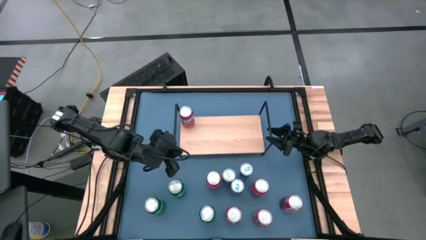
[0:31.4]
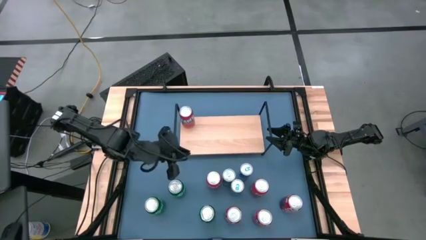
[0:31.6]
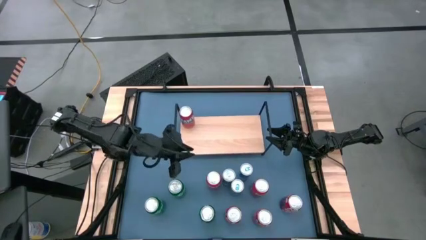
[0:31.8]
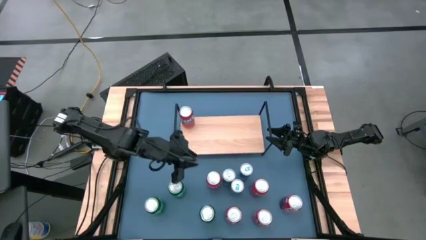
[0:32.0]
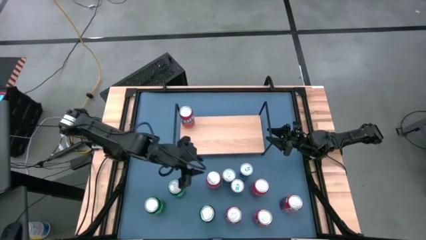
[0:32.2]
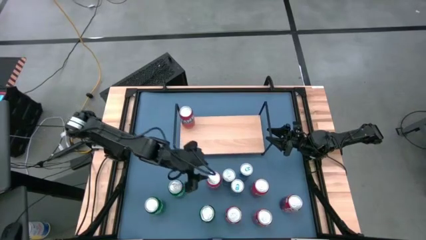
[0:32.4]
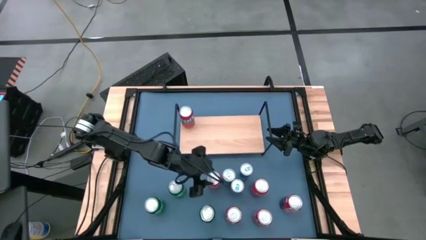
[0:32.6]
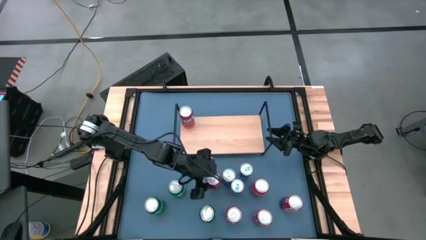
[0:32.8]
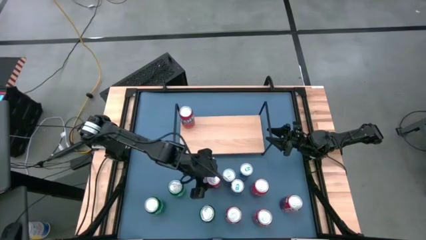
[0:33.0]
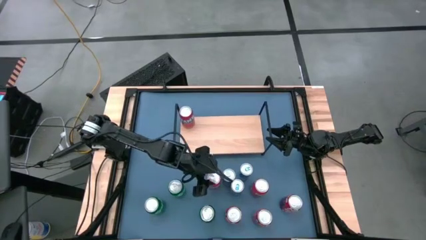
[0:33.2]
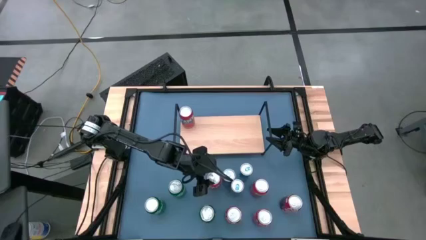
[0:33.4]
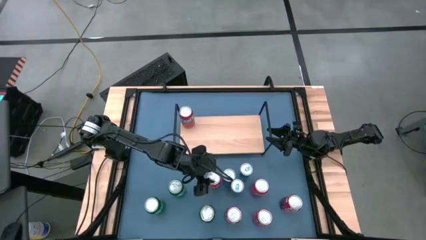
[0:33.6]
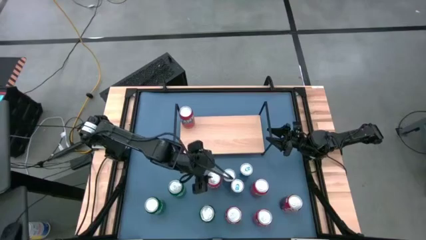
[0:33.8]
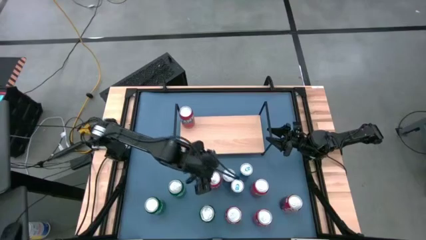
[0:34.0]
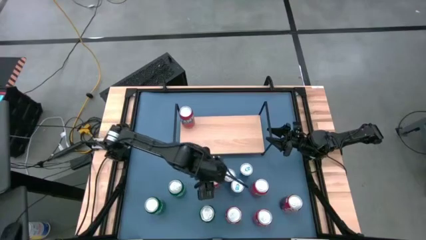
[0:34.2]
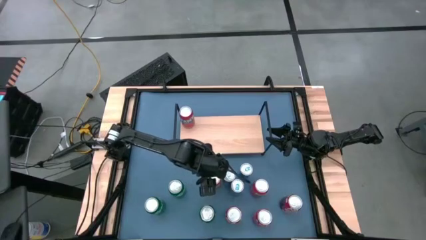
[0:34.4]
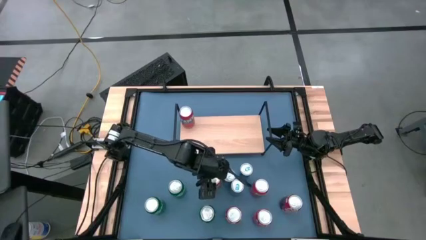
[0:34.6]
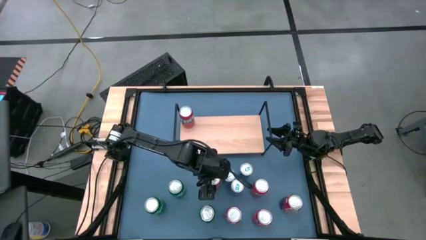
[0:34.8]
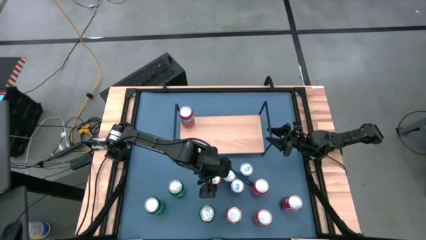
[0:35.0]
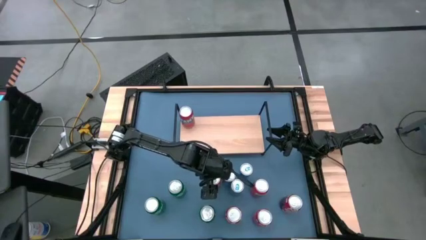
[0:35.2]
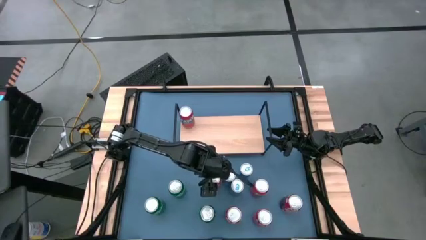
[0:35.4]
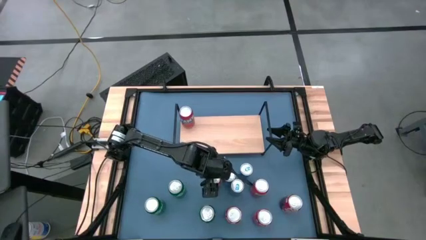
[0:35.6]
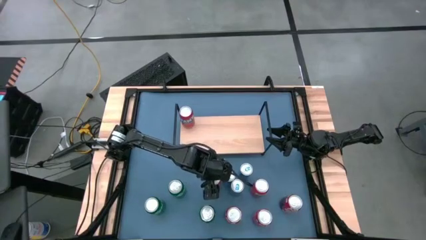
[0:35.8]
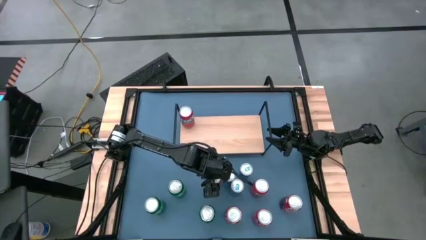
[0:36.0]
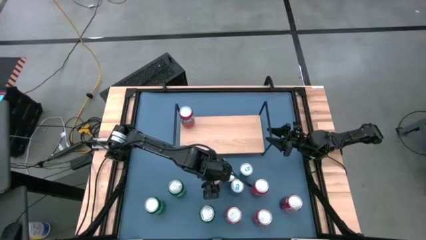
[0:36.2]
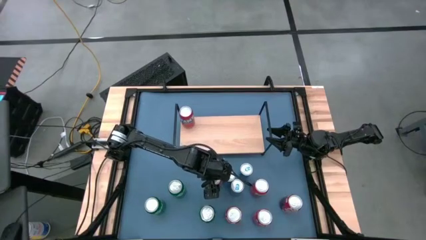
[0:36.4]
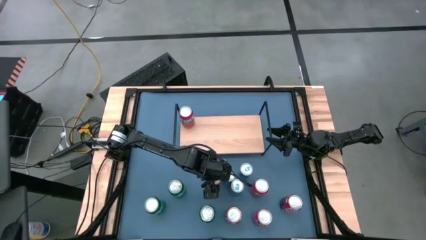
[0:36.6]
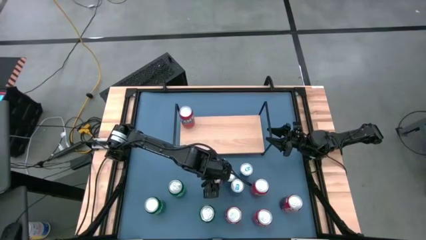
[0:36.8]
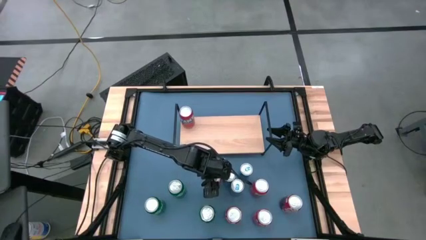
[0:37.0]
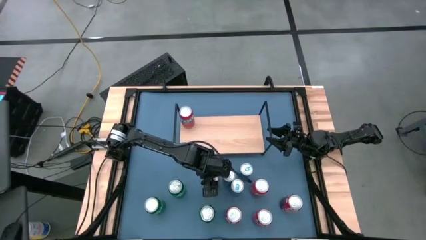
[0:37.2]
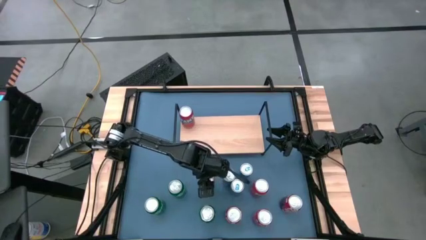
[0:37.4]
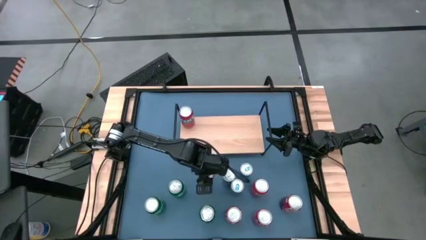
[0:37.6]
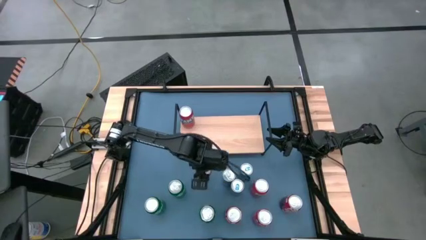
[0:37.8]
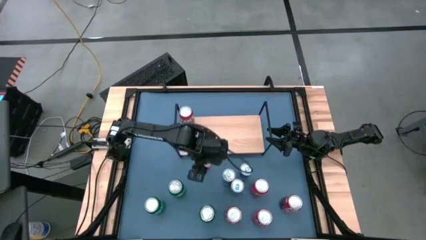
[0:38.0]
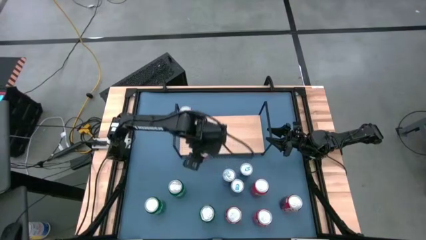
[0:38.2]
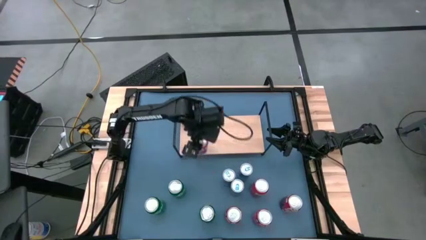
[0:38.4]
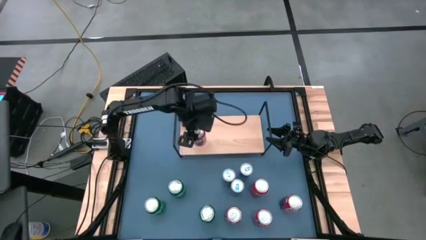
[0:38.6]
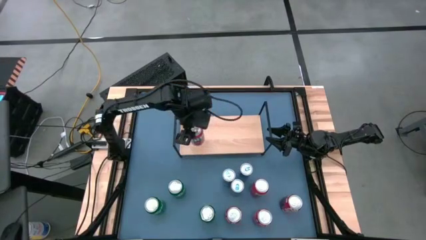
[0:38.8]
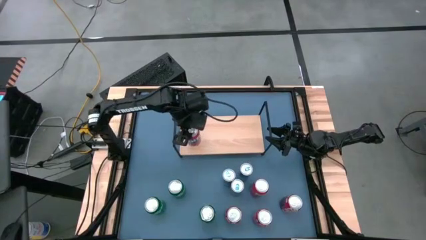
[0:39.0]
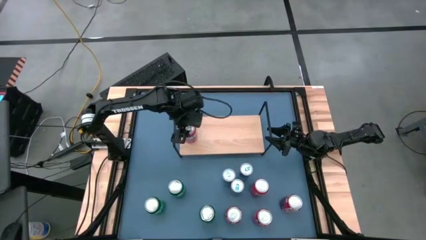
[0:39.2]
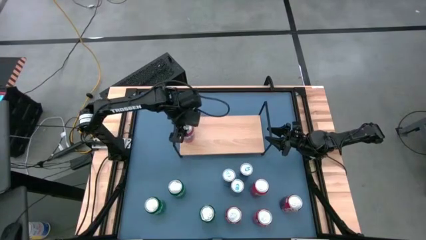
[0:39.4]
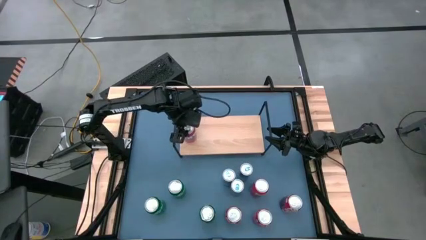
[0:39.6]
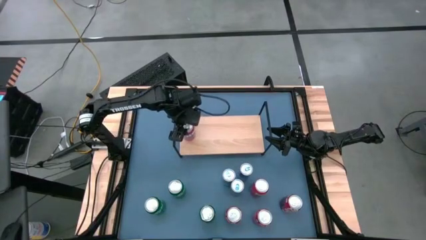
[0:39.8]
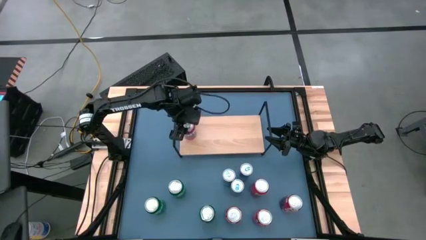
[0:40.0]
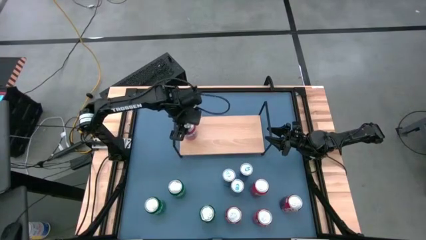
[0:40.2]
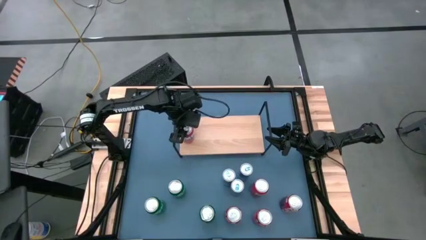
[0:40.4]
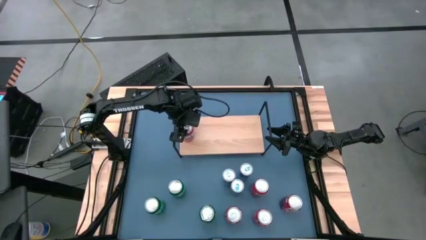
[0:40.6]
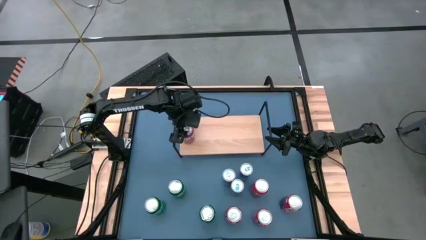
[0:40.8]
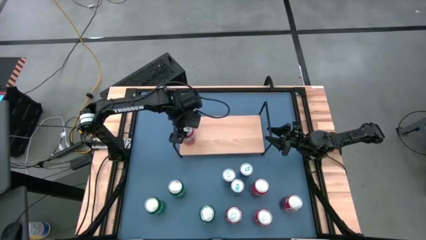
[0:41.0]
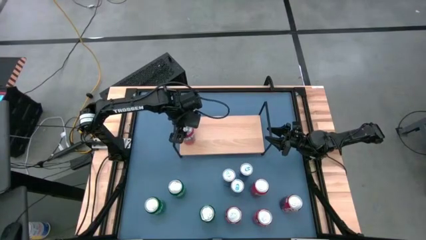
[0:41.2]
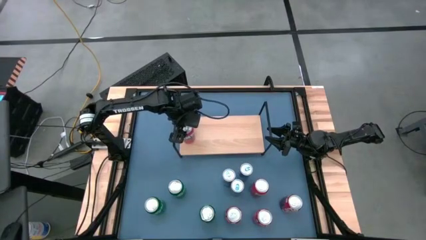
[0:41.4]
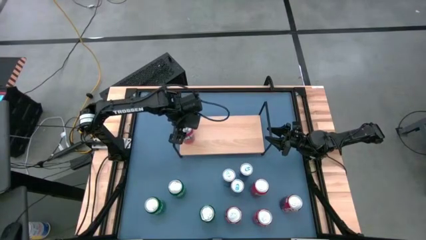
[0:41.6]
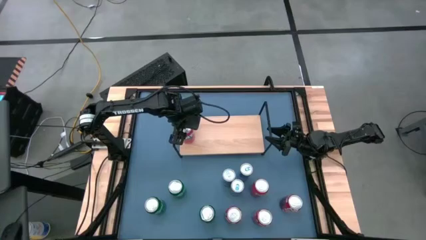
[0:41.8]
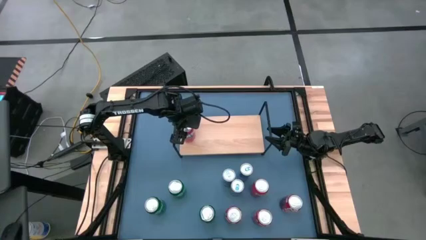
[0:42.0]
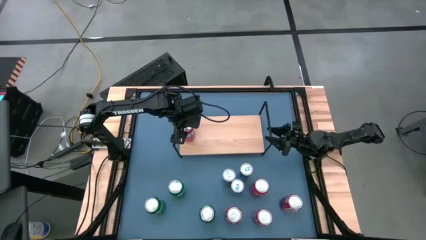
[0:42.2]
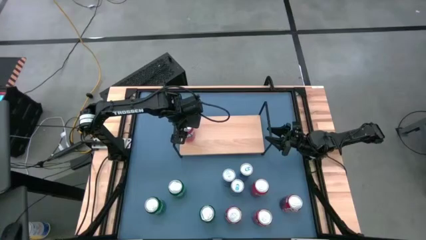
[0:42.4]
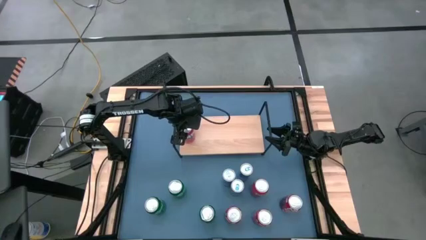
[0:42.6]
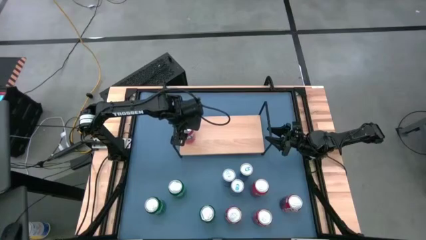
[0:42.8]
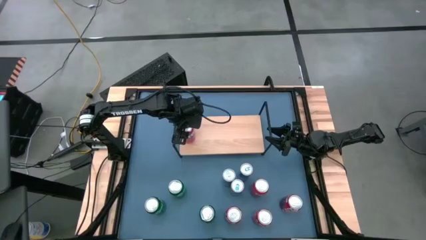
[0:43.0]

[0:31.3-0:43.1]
Task: Place canned beverage on shelf
Put the orange soda can on the shelf aligned with other orange soda can
